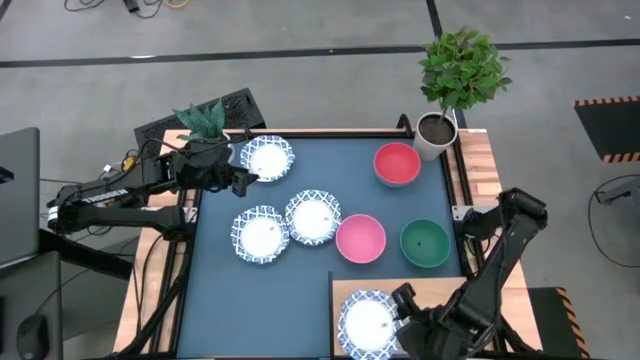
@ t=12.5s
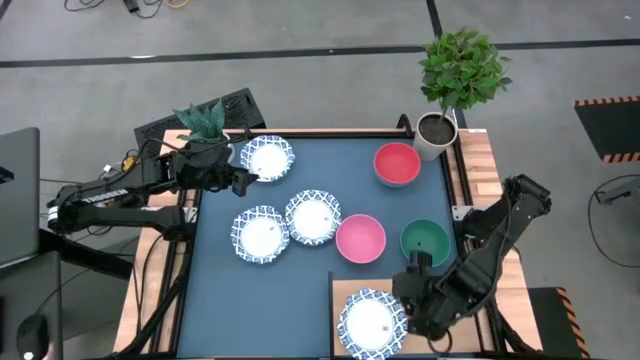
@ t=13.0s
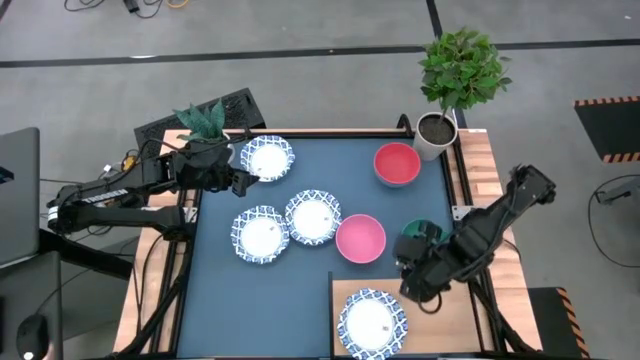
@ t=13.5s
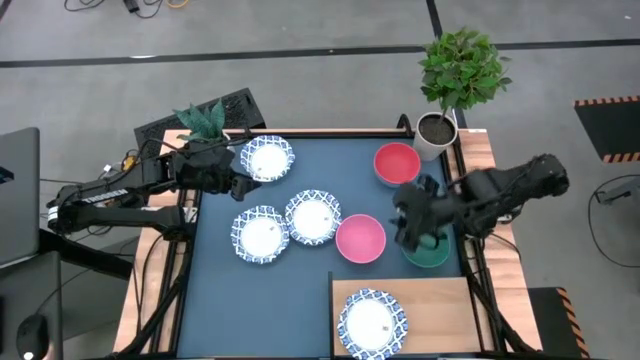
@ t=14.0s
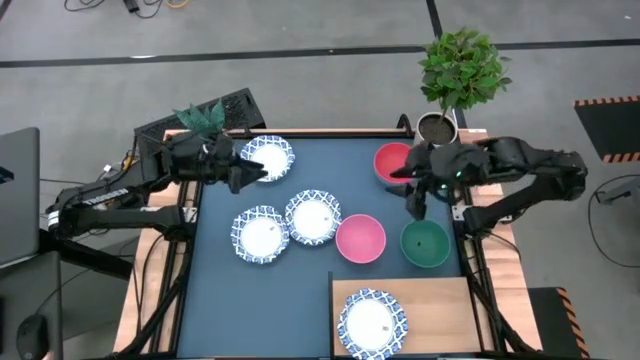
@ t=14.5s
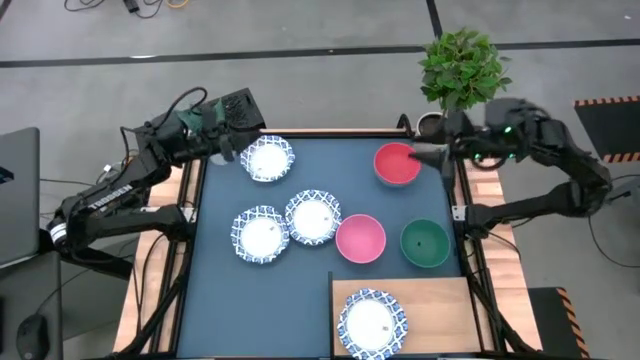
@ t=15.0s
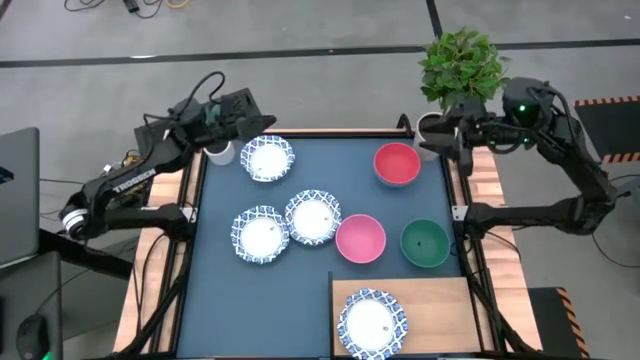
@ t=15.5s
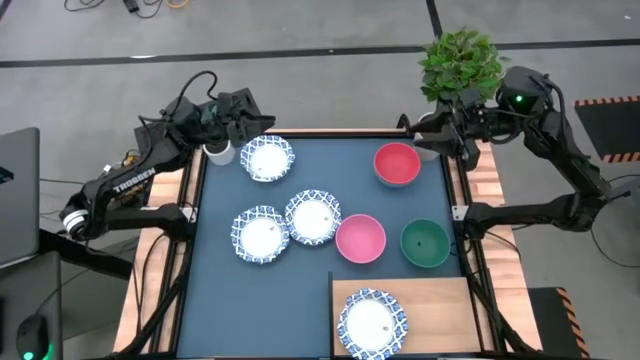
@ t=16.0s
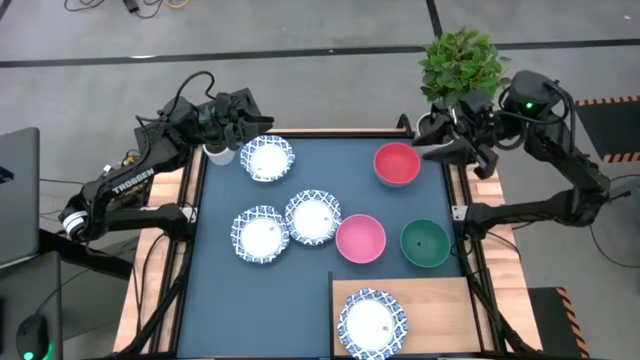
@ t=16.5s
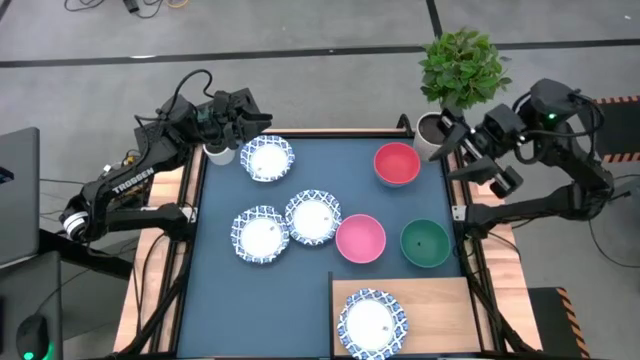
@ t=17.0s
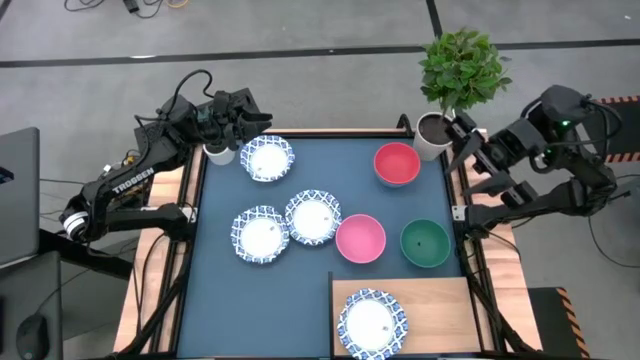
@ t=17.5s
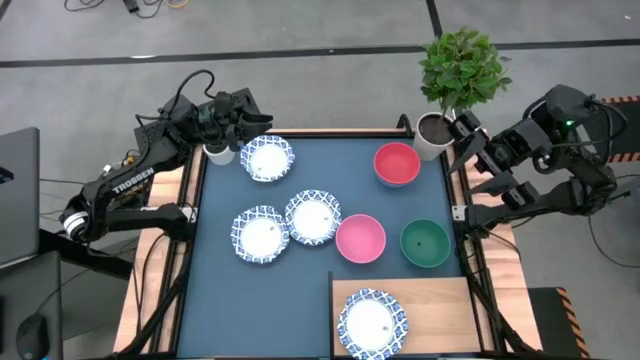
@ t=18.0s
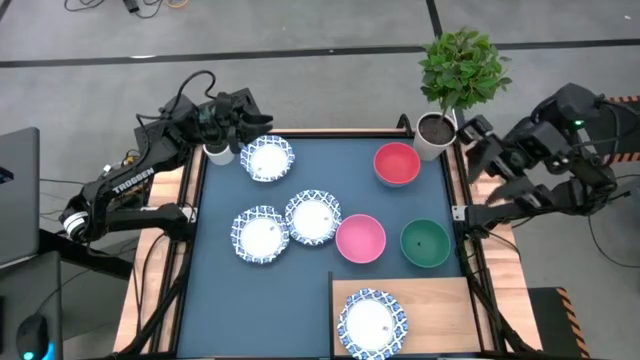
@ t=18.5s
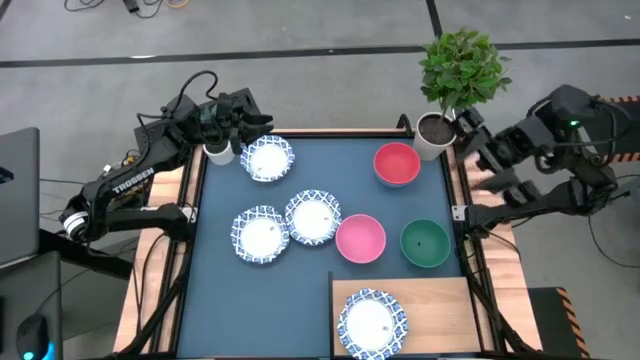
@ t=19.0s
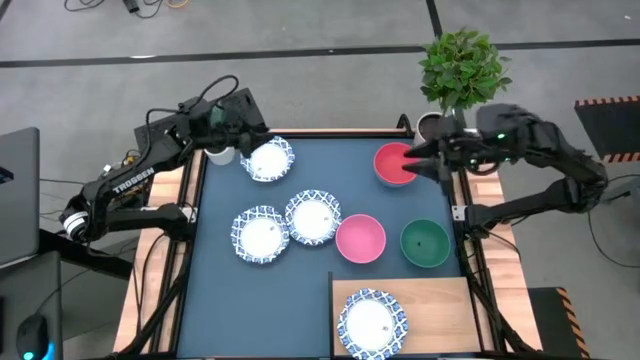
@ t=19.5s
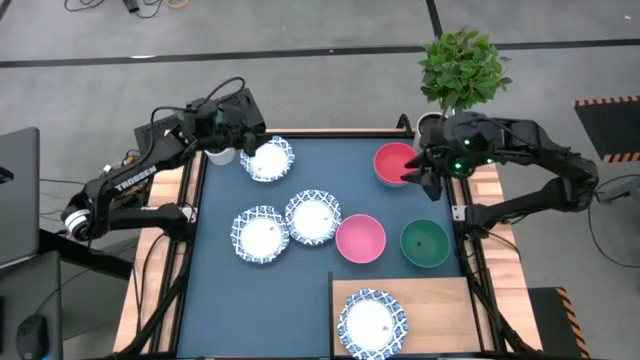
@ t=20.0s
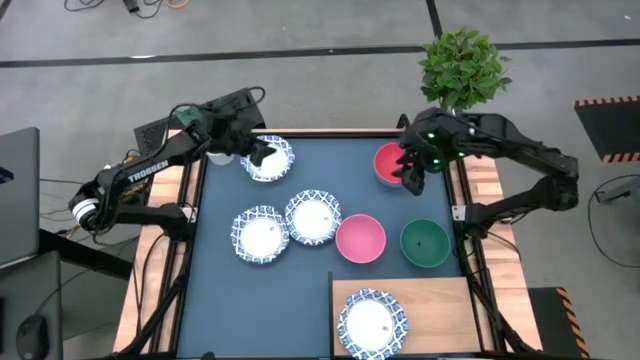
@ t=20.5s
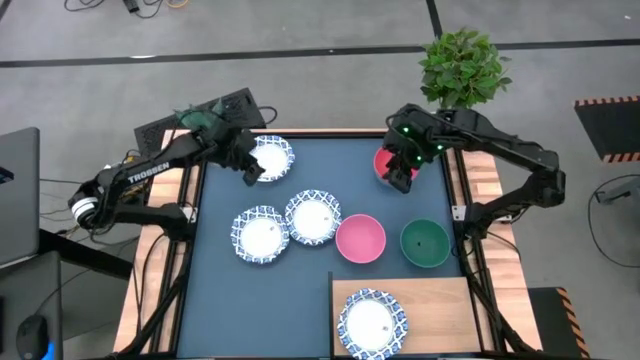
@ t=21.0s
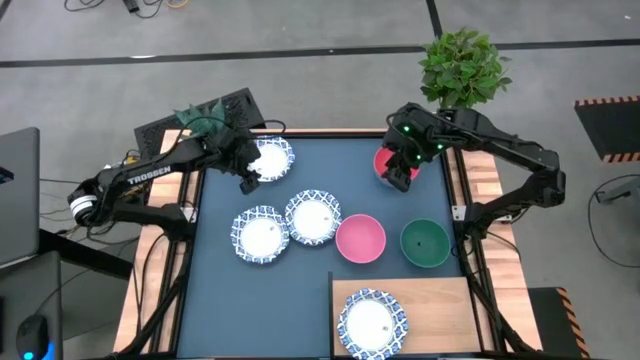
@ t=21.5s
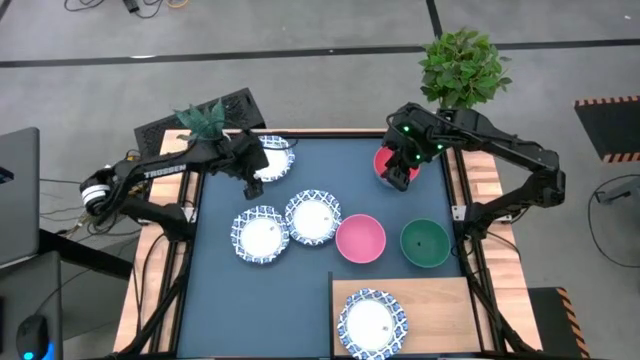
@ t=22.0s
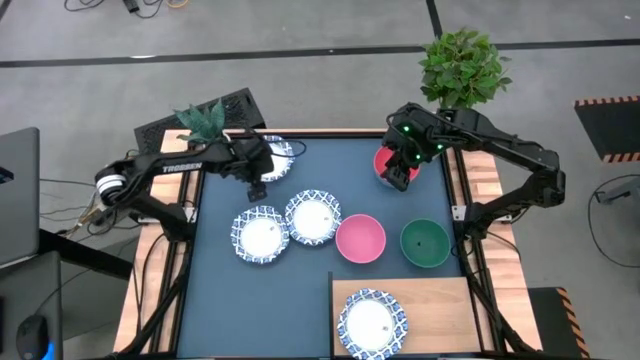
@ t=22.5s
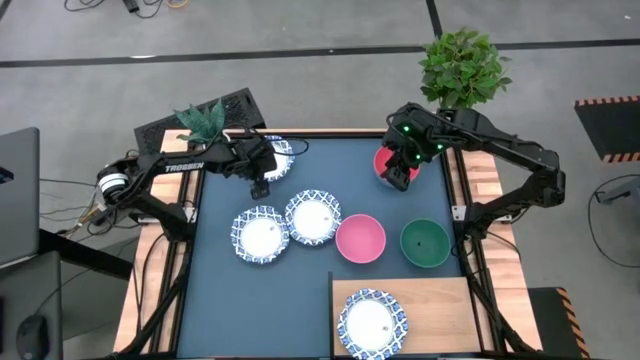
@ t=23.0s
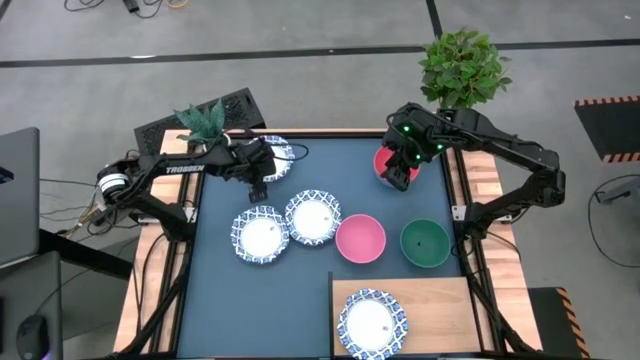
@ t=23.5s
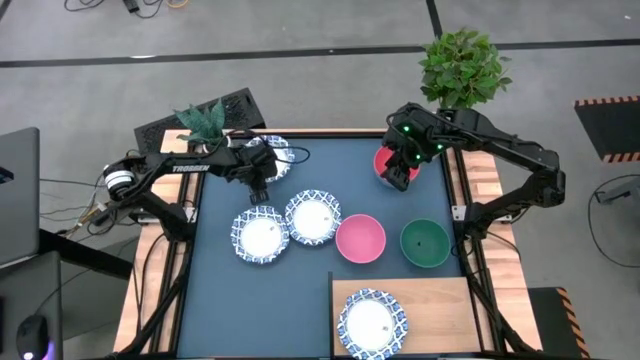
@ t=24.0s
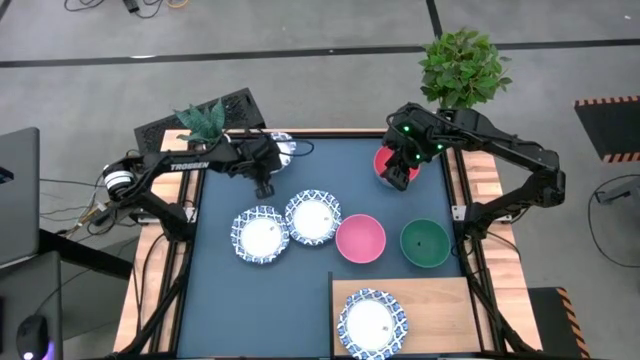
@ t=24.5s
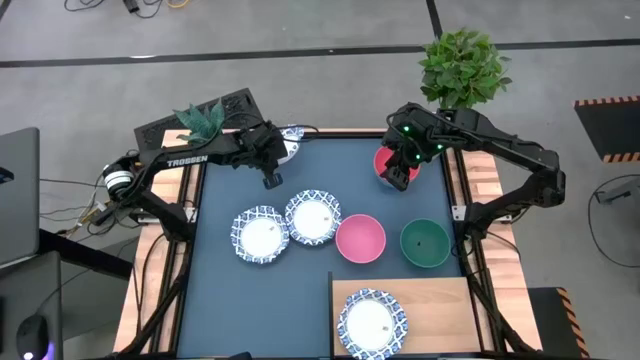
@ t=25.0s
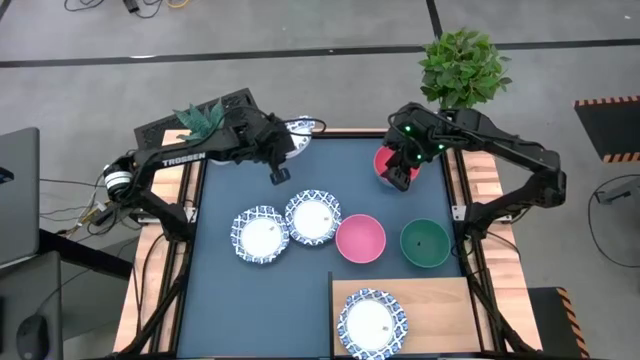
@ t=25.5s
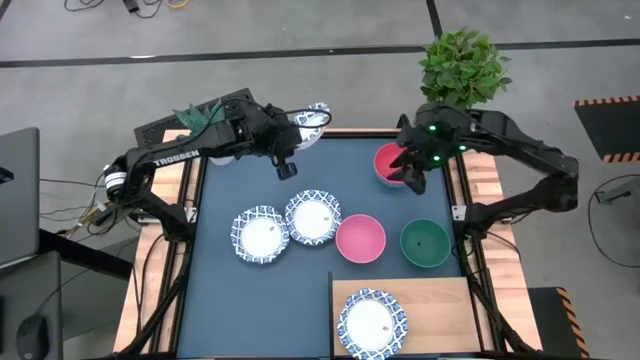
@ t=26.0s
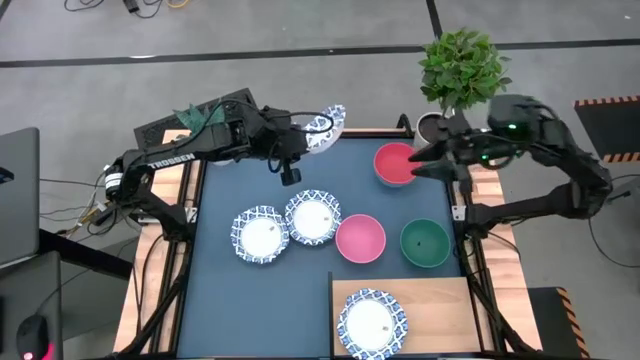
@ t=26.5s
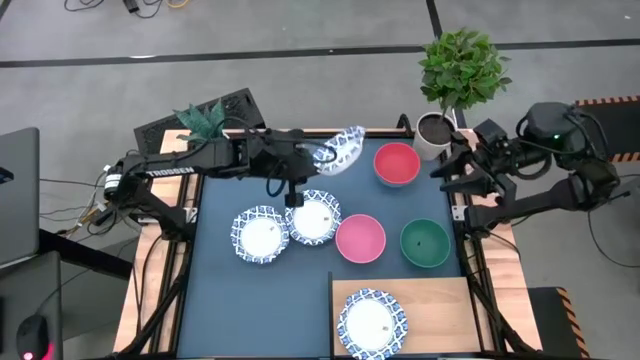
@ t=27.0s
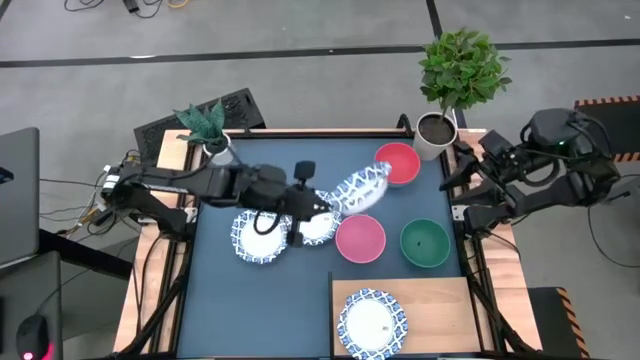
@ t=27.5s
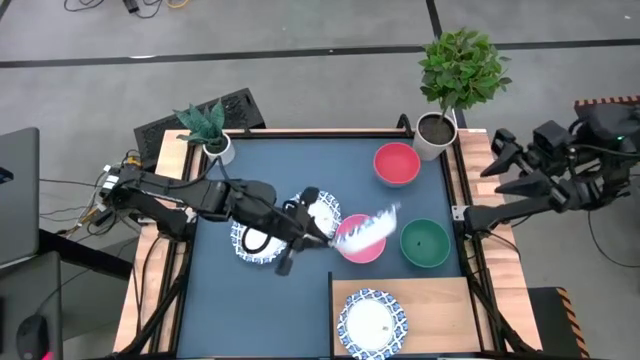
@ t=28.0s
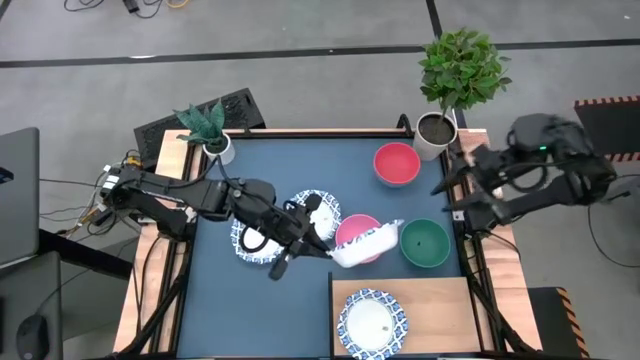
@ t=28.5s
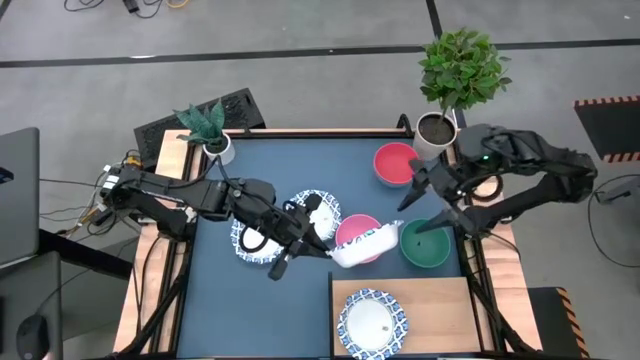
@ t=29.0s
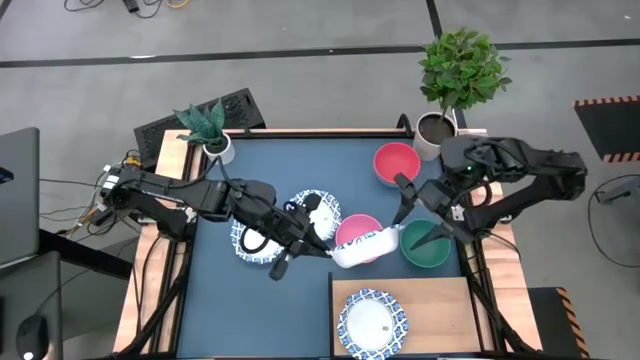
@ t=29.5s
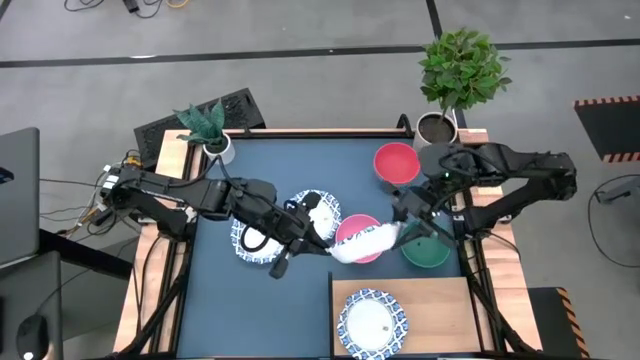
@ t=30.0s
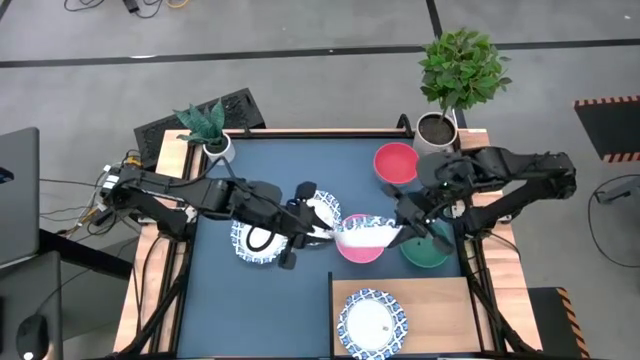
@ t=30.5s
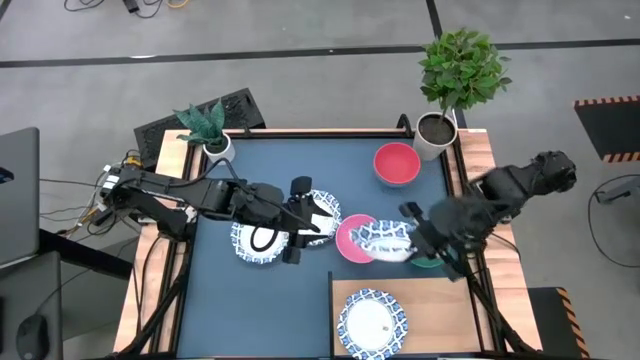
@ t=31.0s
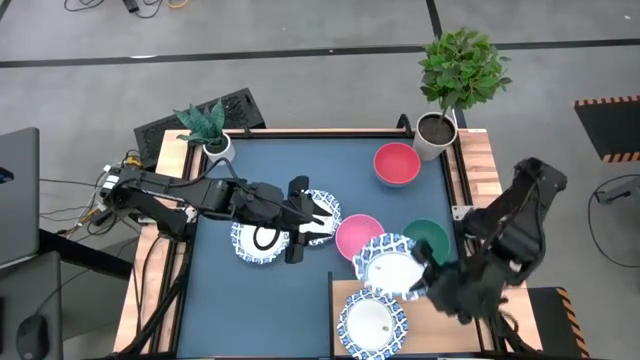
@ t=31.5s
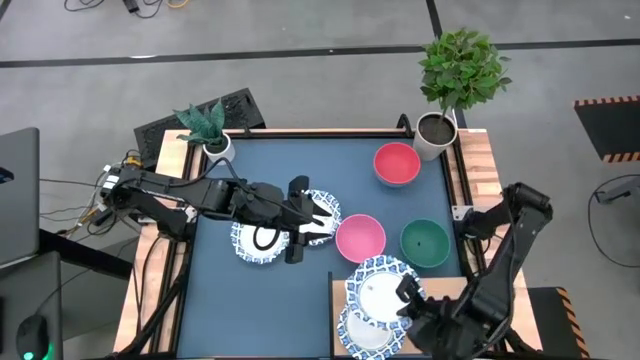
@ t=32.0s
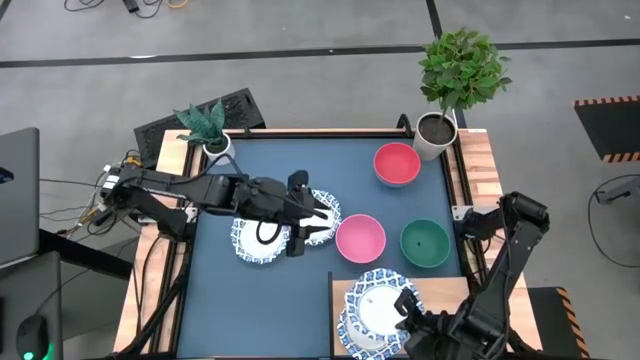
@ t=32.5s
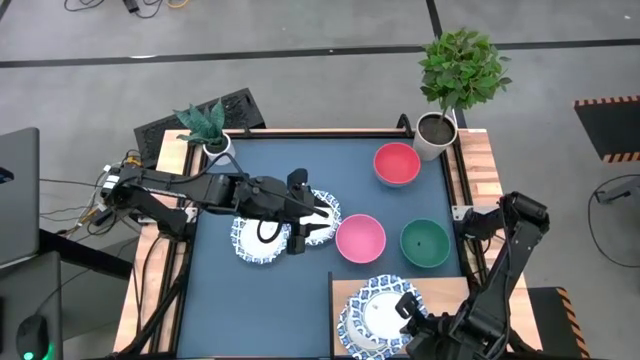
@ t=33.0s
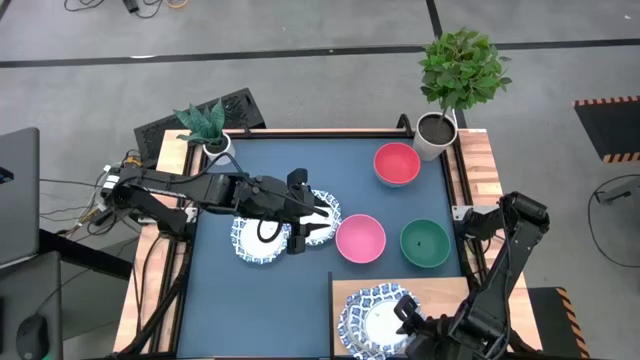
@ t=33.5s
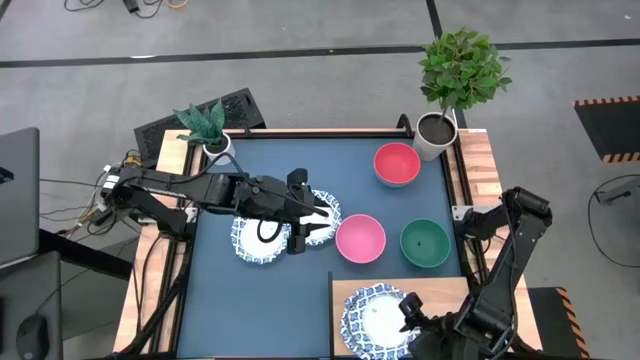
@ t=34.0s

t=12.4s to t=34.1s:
Task: Place and stack bowls onto a shelf
Stack the white patterned bowl on the white patterned bowl on the shelf
